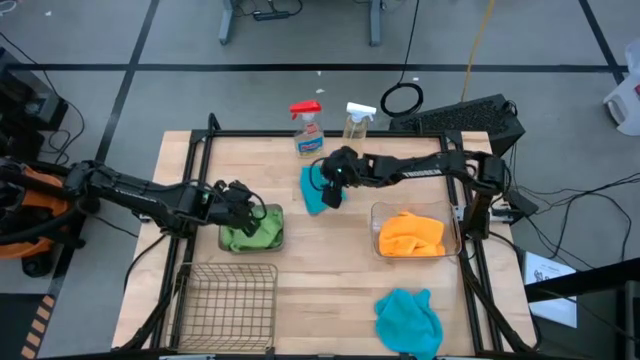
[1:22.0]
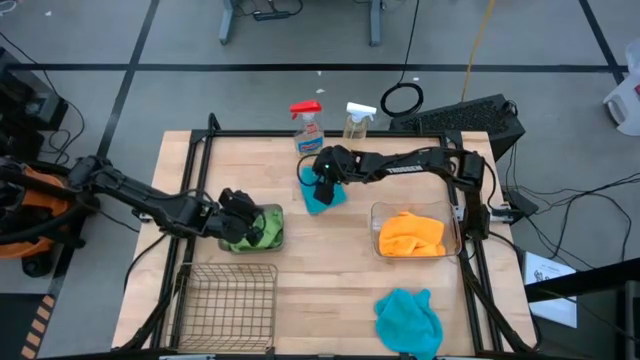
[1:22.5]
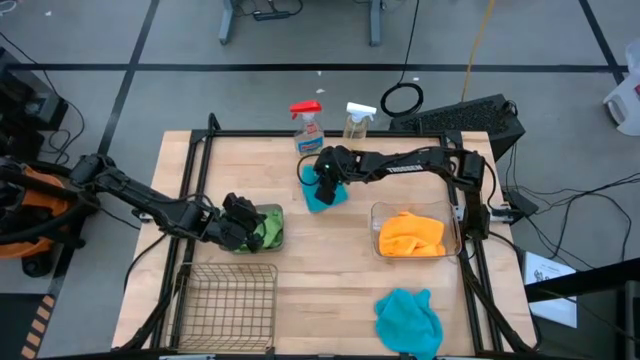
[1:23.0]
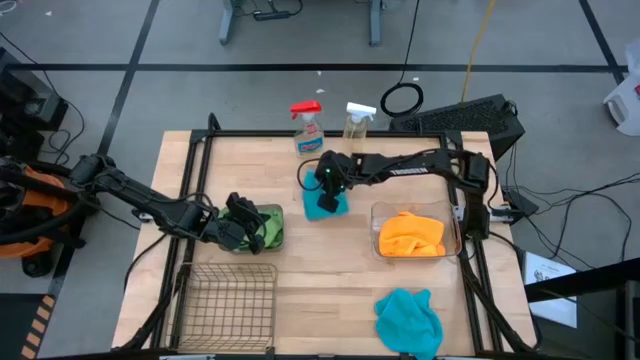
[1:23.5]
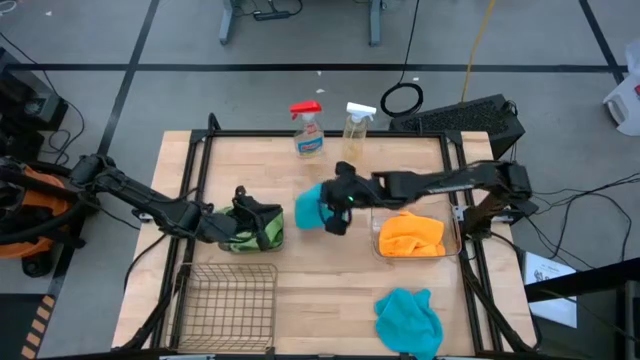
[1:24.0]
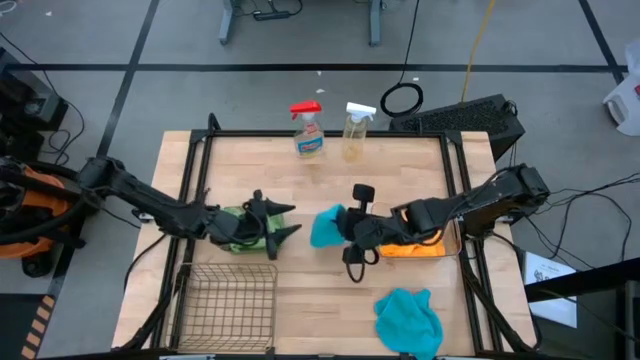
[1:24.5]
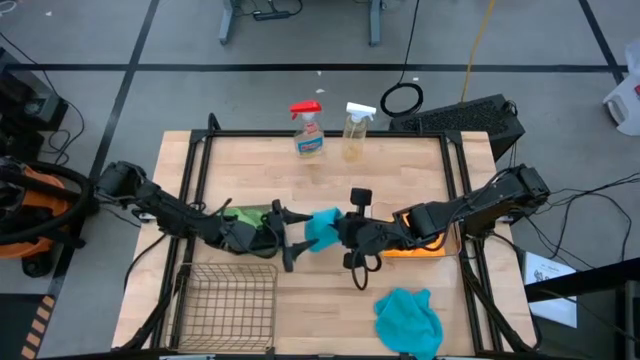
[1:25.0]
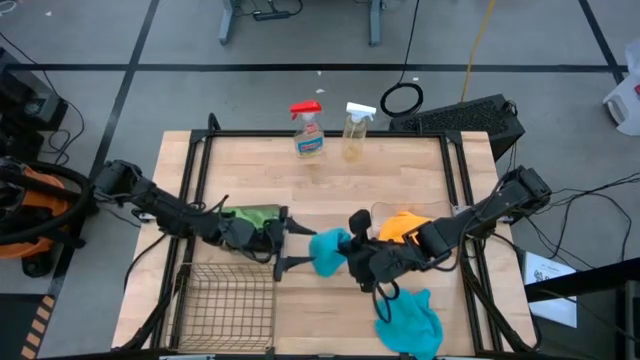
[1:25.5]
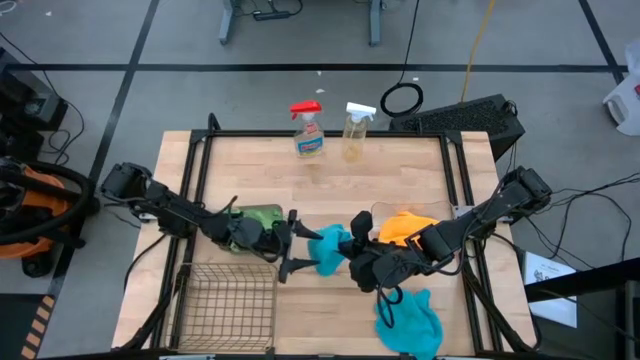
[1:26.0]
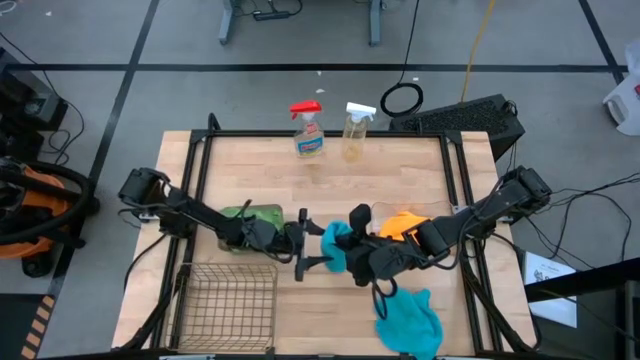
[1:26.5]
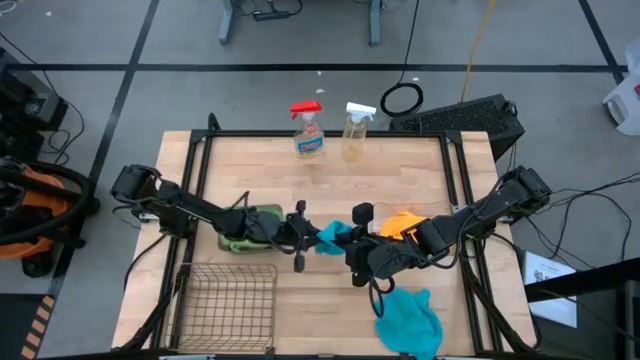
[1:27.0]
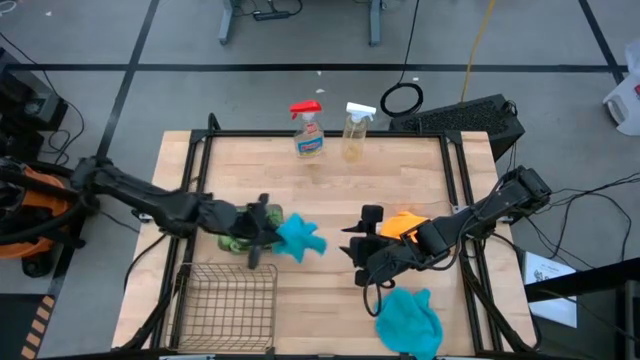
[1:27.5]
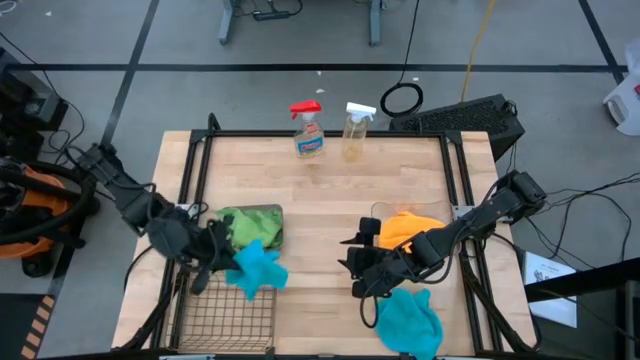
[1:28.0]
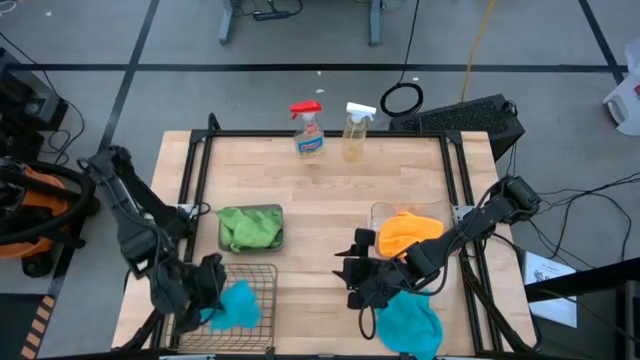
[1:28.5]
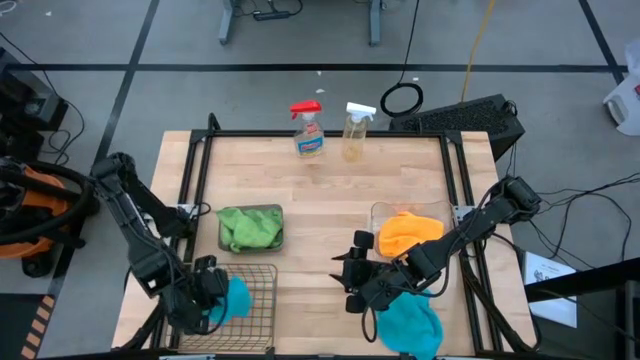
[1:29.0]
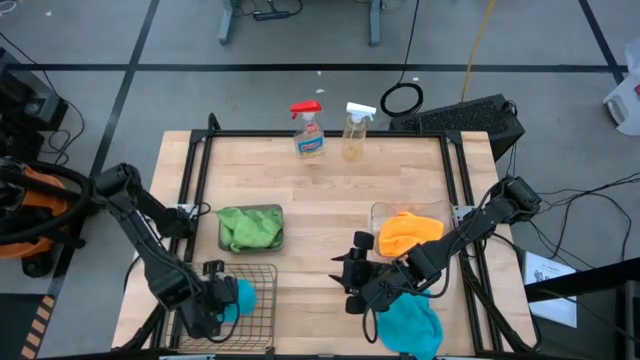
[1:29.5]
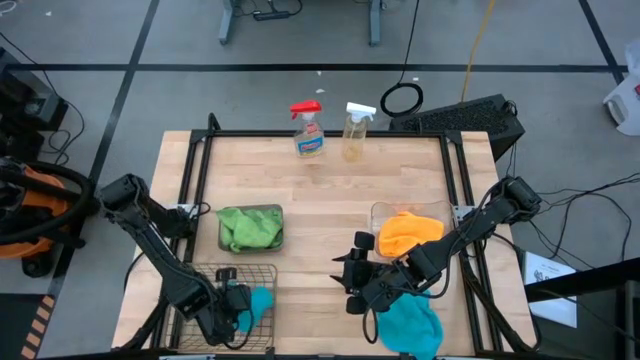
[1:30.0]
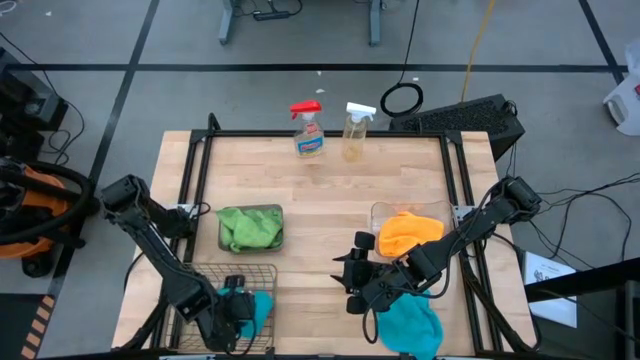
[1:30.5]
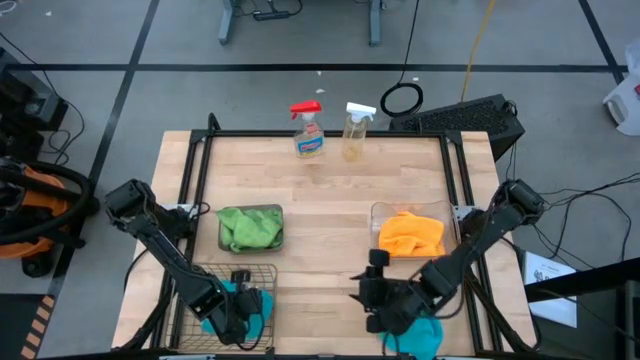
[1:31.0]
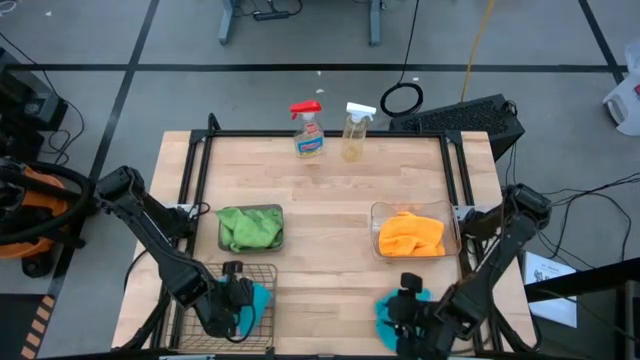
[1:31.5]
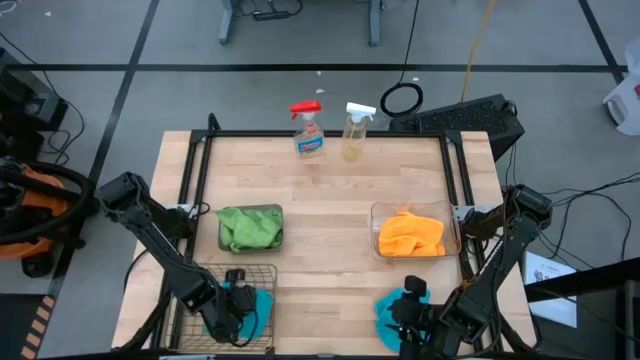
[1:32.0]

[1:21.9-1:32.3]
Task: Sort microfiber towel by color & place in baskets
Put the top blue microfiber towel into the wire basket

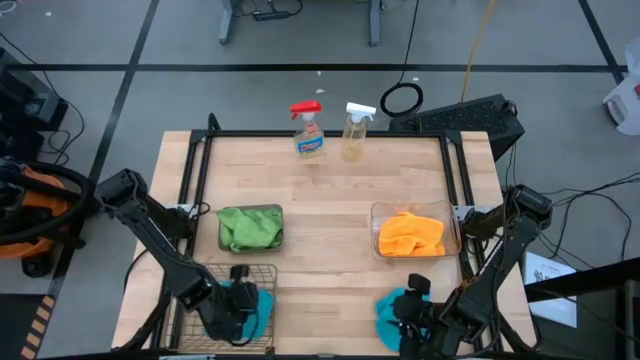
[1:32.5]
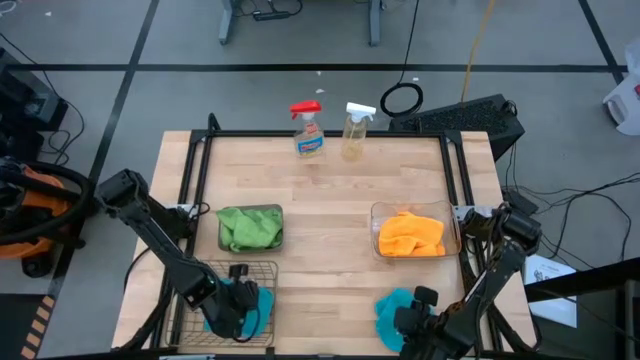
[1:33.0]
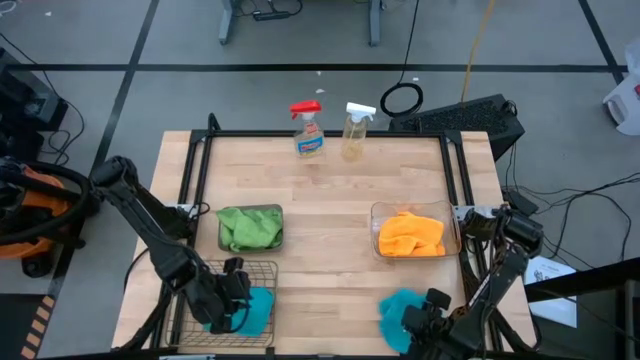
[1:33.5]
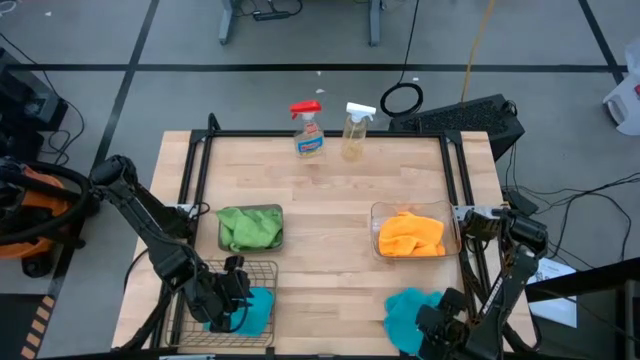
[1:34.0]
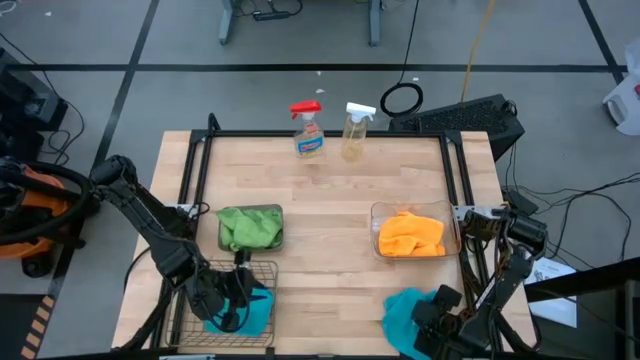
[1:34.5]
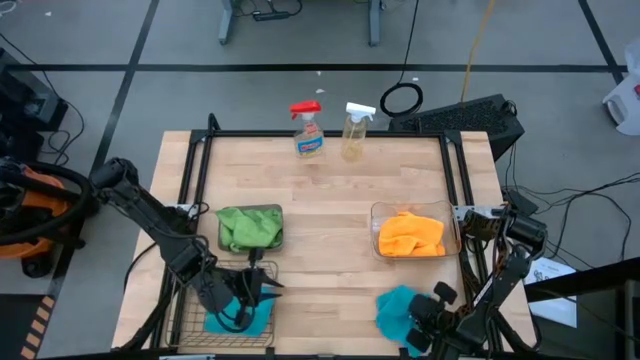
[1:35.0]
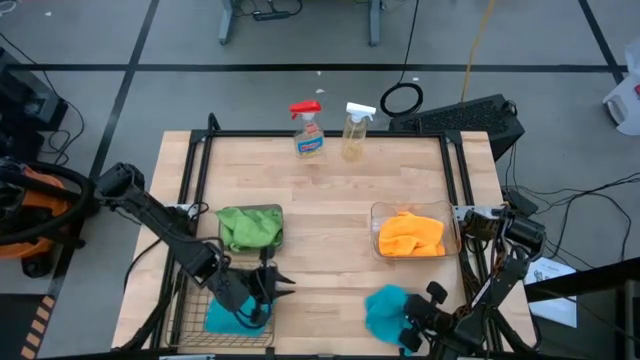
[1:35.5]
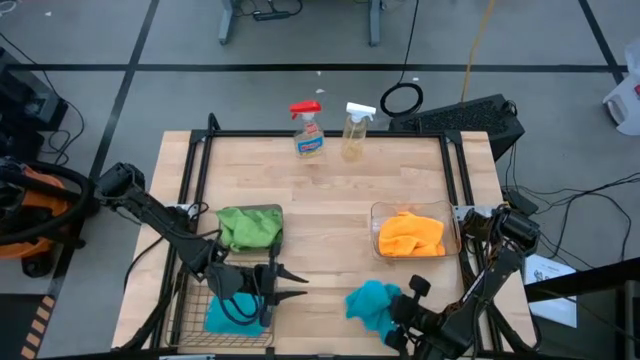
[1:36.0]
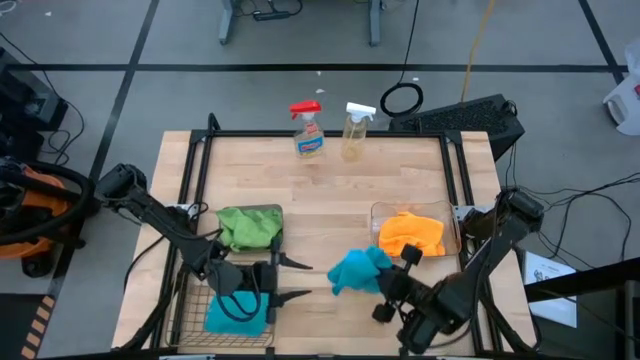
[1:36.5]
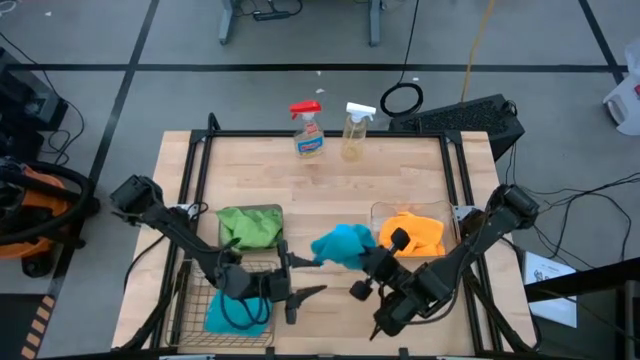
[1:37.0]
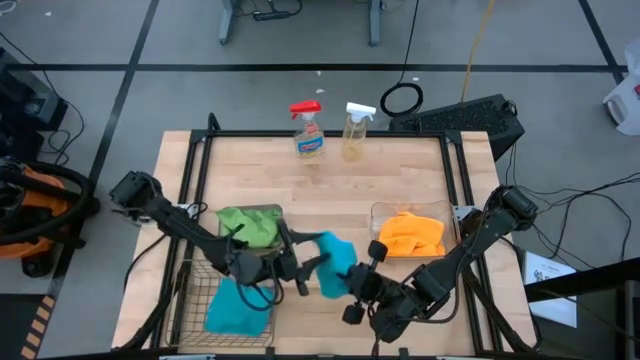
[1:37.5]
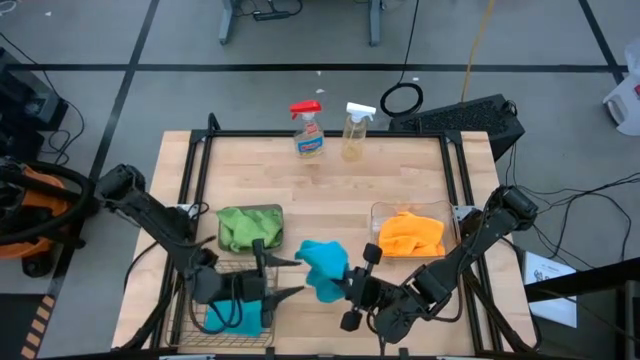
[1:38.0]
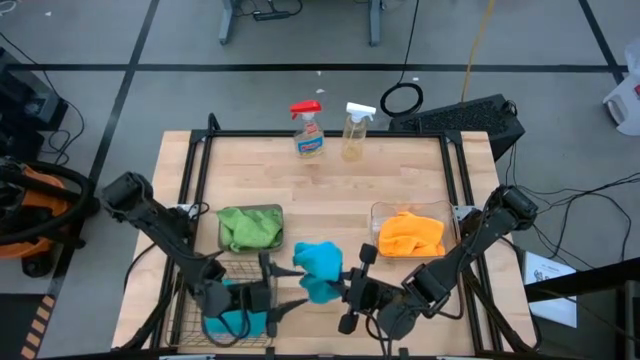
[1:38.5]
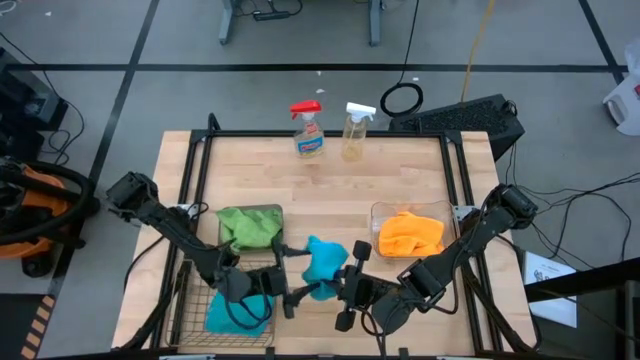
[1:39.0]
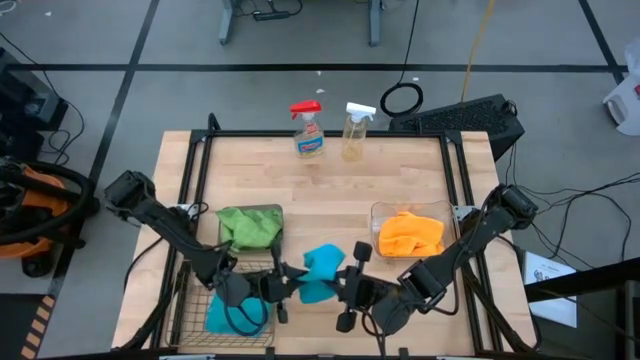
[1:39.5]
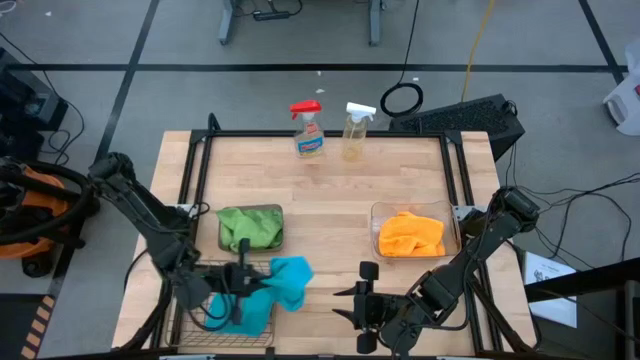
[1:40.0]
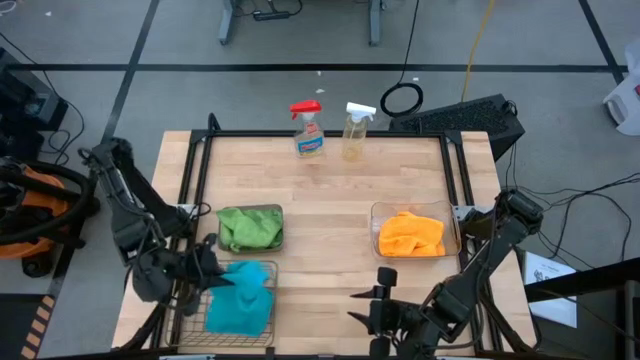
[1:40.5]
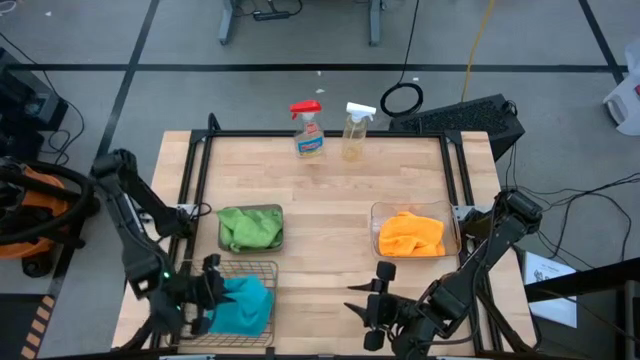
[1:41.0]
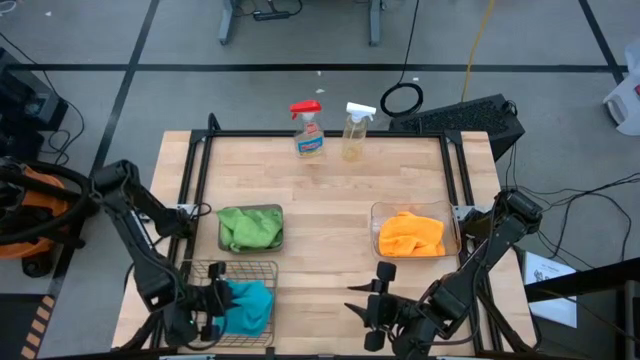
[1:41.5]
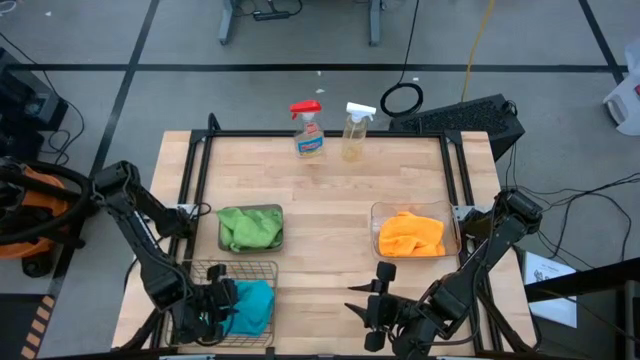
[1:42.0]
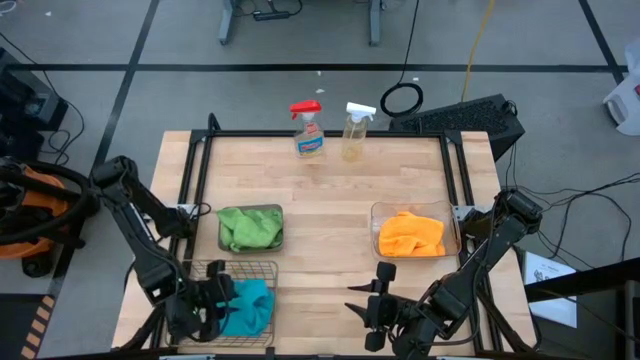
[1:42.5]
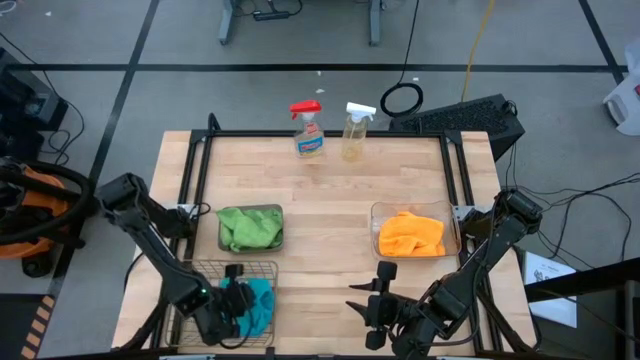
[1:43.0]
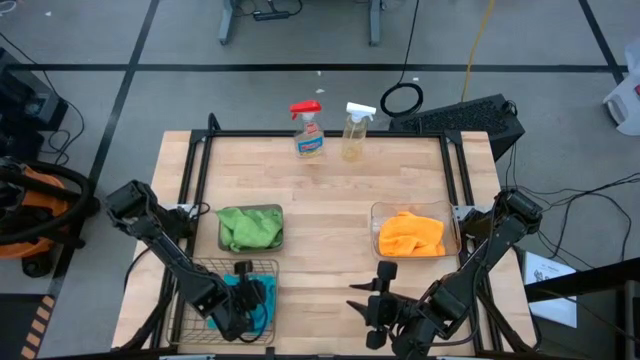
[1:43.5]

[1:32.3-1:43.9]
Put the blue microfiber towel into the wire basket

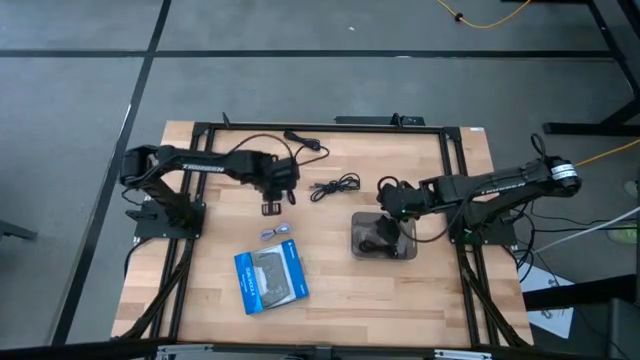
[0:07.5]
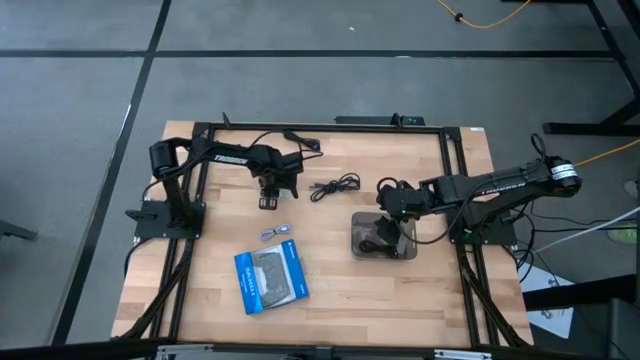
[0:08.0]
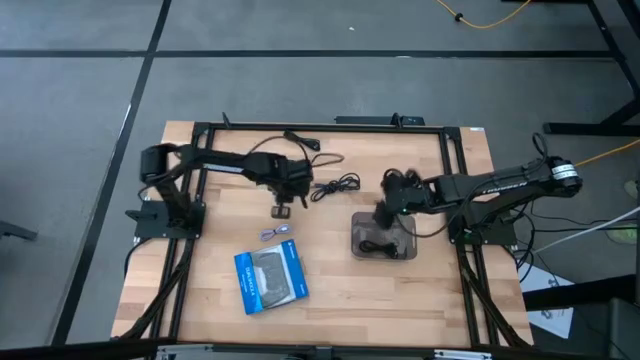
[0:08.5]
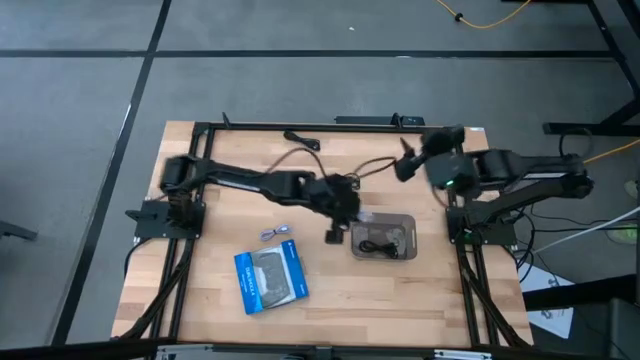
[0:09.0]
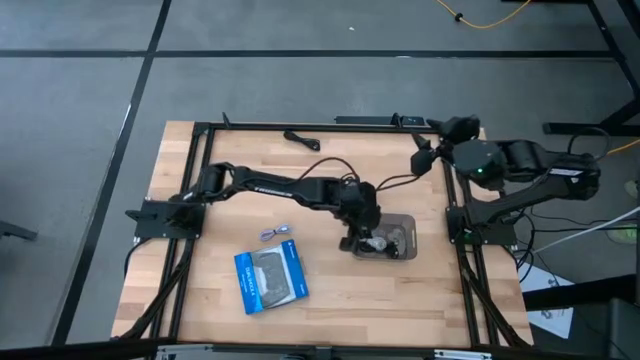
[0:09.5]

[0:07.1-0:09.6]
Task: Pick and place USB-C Cables
Put the top white charger cable into the black bin
